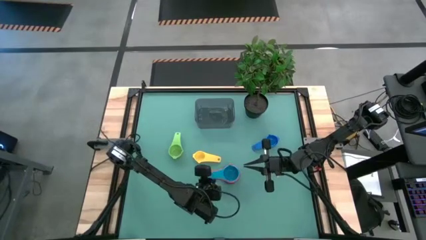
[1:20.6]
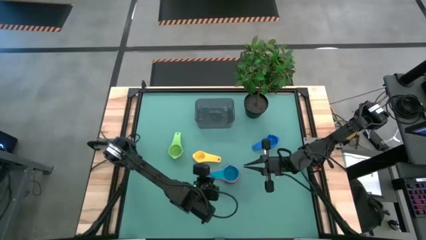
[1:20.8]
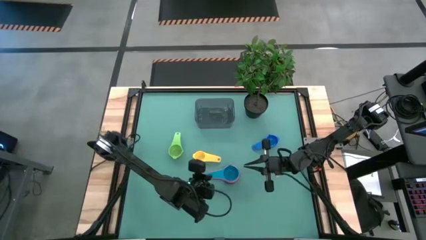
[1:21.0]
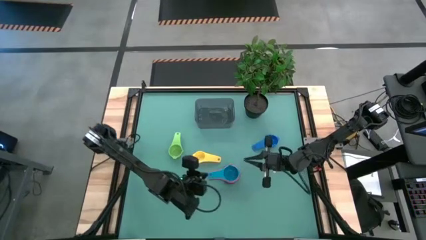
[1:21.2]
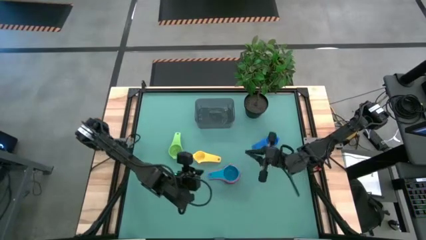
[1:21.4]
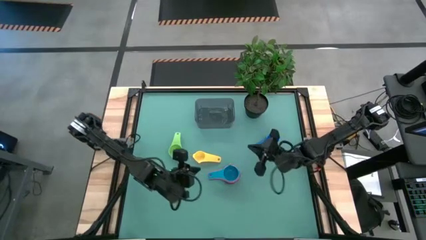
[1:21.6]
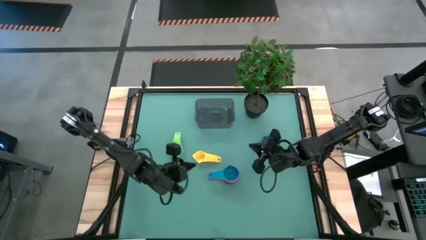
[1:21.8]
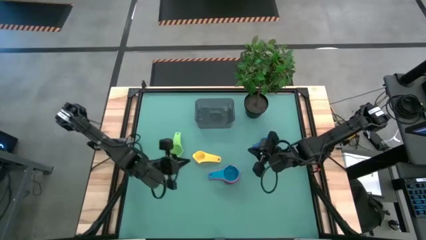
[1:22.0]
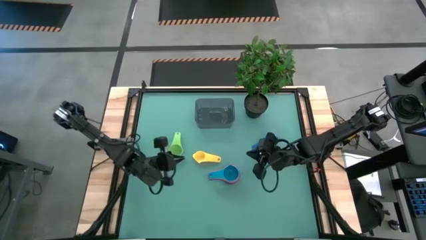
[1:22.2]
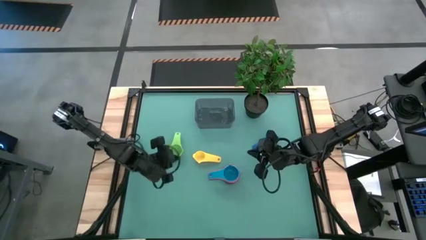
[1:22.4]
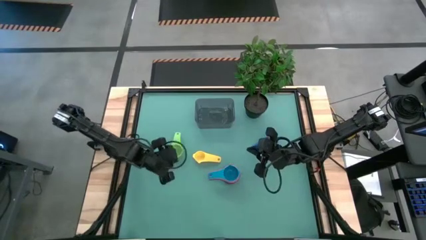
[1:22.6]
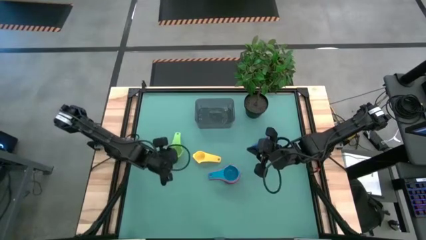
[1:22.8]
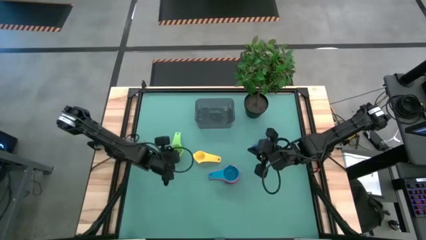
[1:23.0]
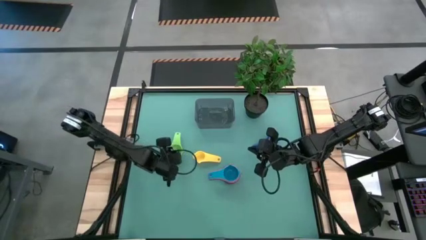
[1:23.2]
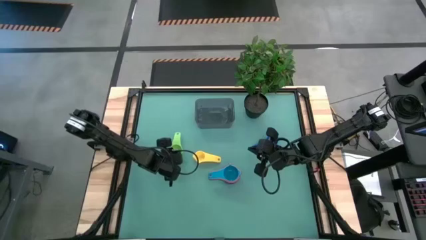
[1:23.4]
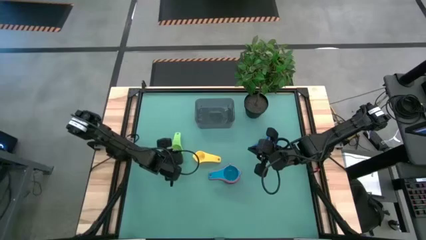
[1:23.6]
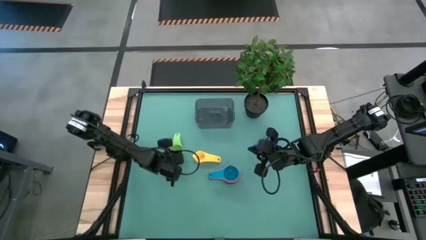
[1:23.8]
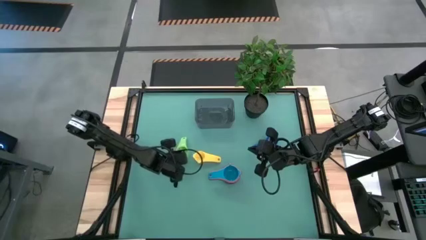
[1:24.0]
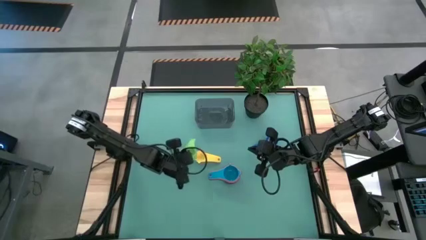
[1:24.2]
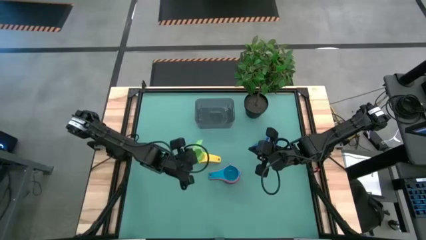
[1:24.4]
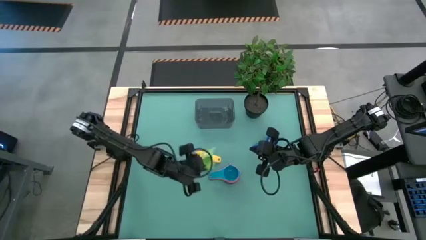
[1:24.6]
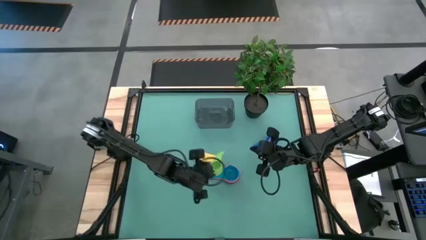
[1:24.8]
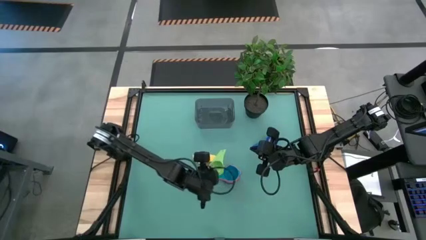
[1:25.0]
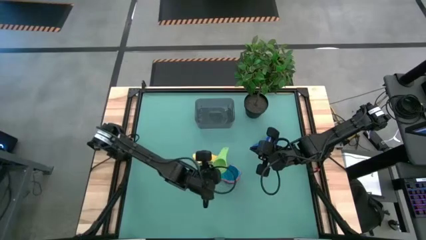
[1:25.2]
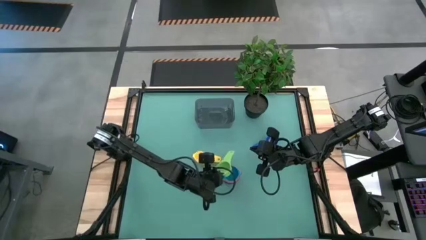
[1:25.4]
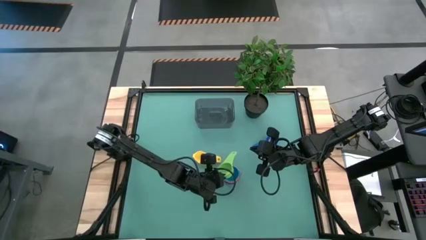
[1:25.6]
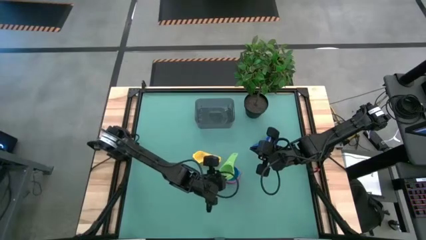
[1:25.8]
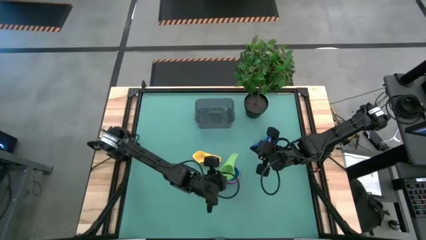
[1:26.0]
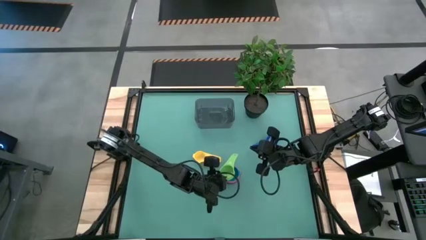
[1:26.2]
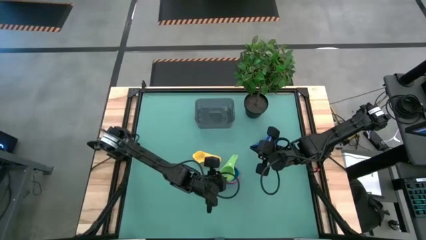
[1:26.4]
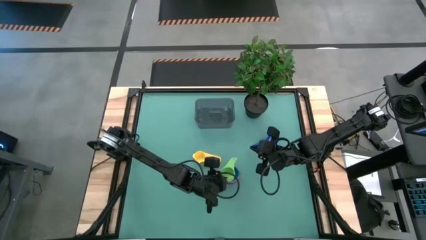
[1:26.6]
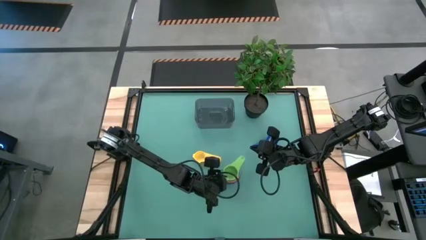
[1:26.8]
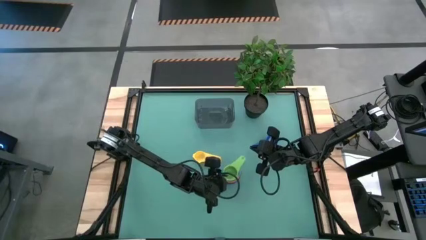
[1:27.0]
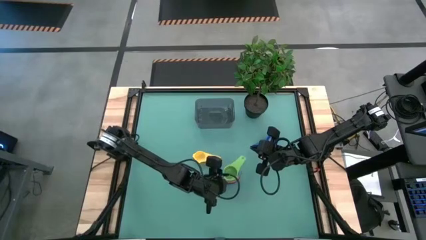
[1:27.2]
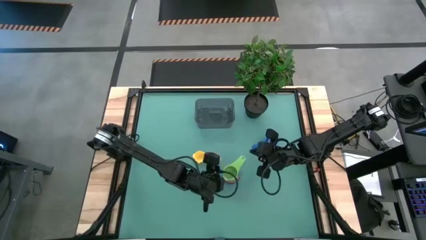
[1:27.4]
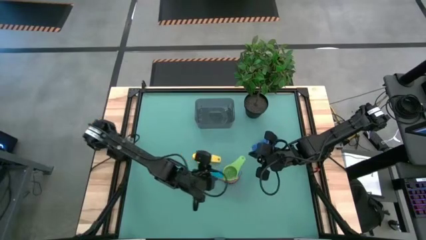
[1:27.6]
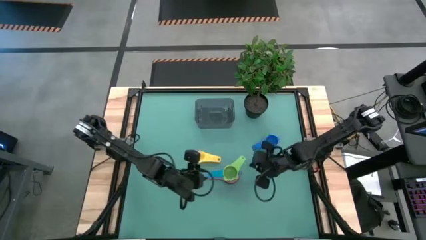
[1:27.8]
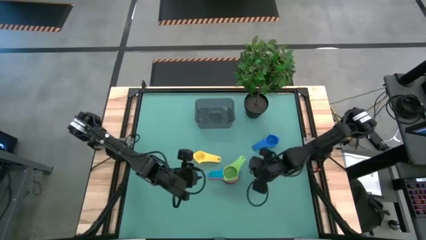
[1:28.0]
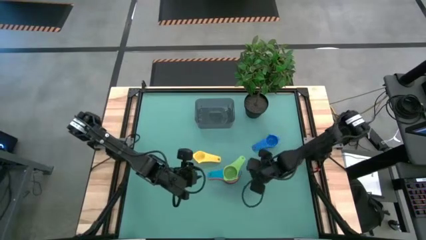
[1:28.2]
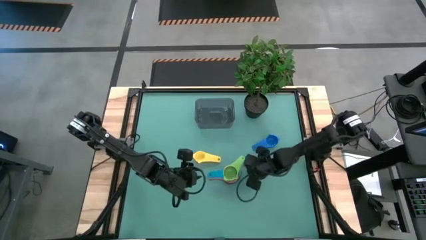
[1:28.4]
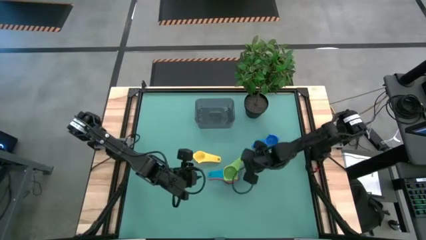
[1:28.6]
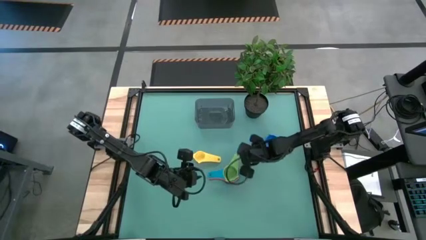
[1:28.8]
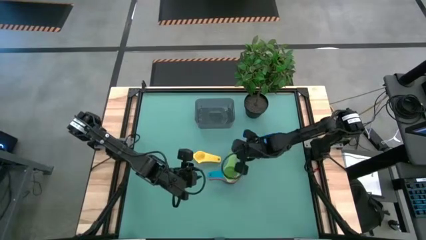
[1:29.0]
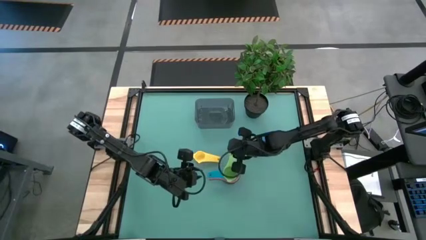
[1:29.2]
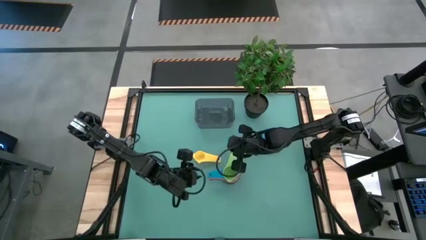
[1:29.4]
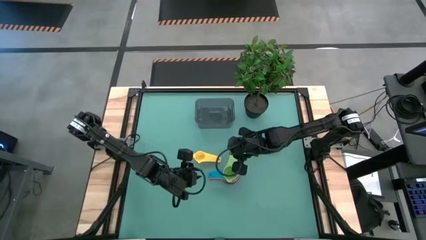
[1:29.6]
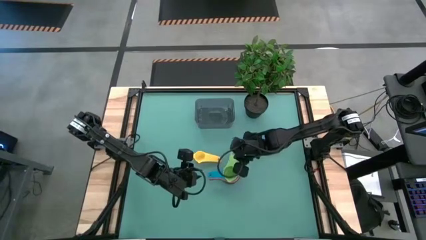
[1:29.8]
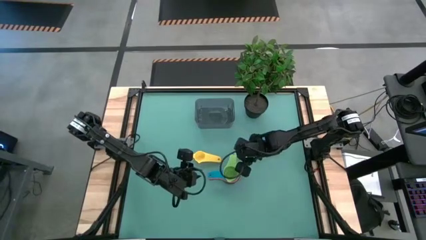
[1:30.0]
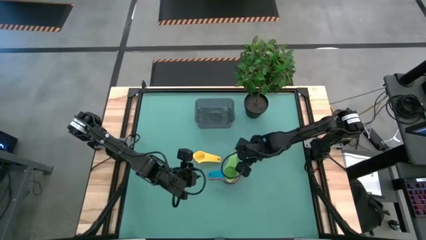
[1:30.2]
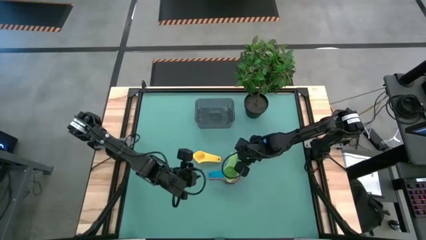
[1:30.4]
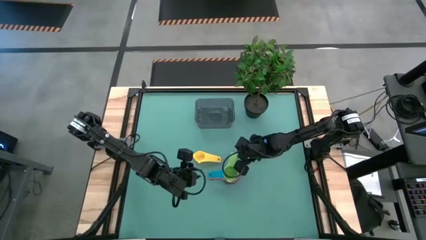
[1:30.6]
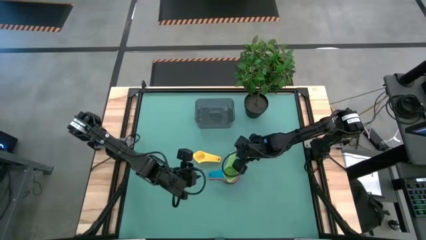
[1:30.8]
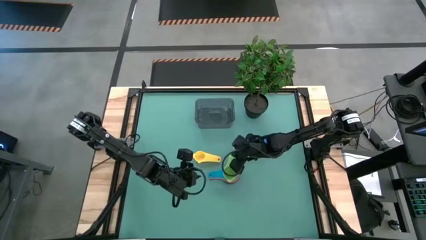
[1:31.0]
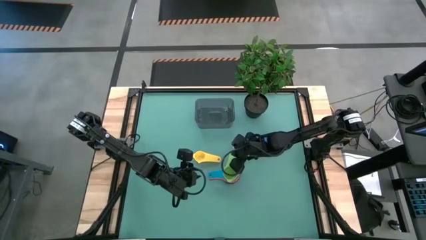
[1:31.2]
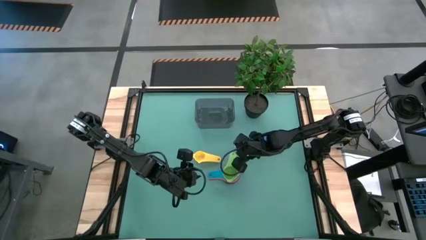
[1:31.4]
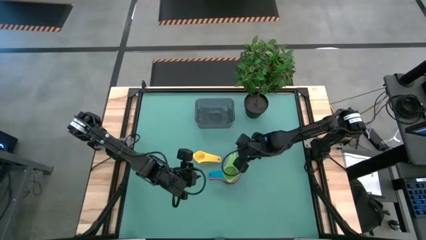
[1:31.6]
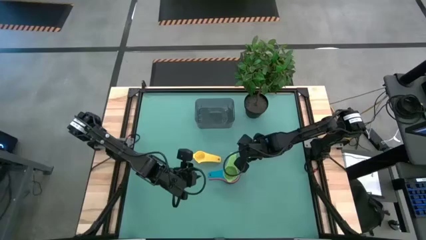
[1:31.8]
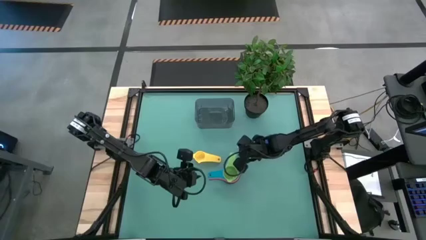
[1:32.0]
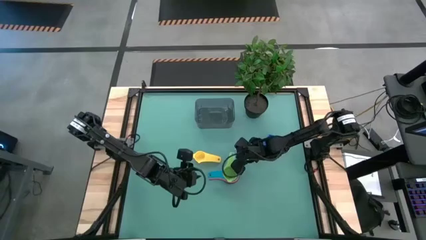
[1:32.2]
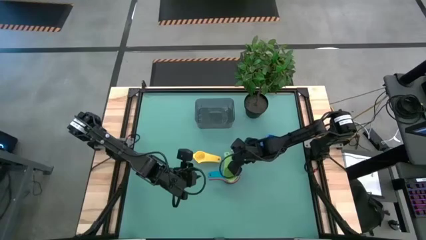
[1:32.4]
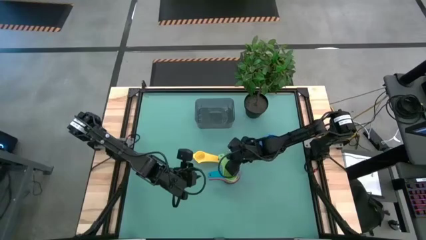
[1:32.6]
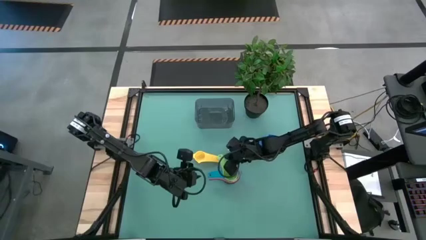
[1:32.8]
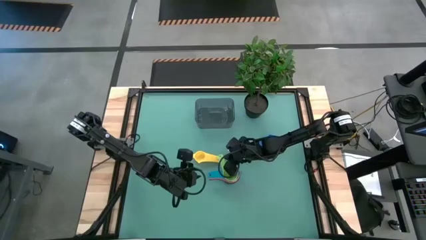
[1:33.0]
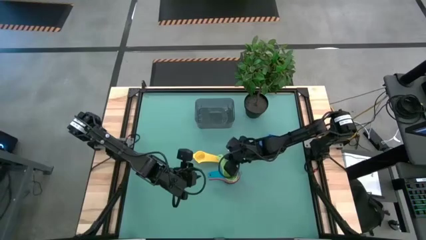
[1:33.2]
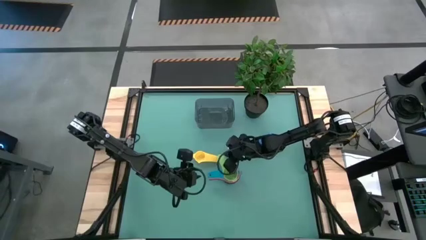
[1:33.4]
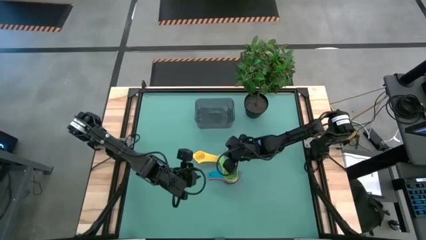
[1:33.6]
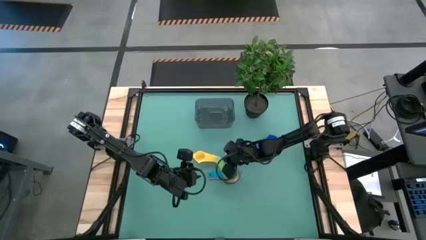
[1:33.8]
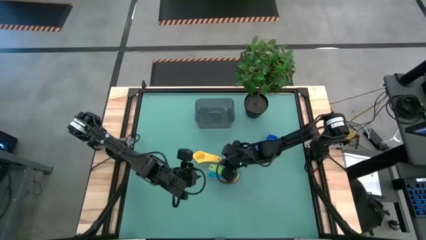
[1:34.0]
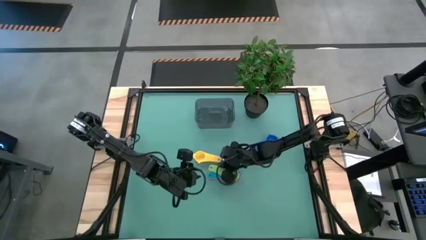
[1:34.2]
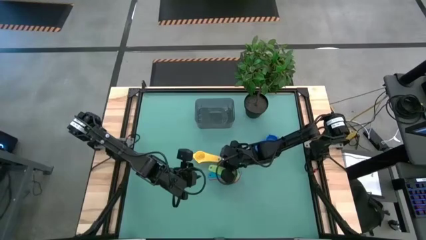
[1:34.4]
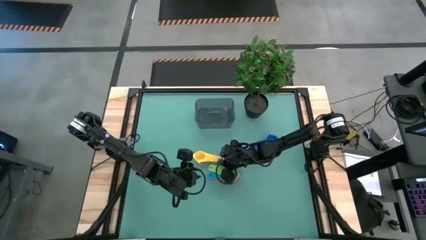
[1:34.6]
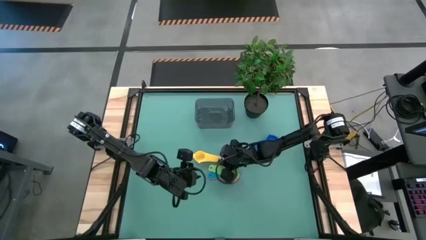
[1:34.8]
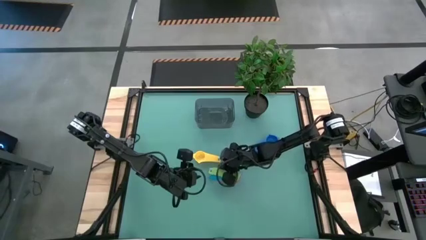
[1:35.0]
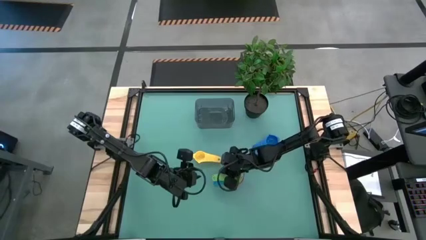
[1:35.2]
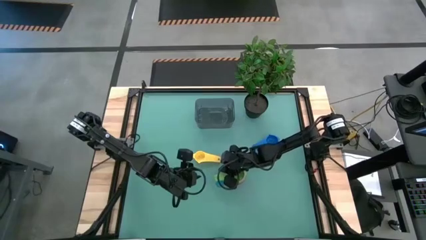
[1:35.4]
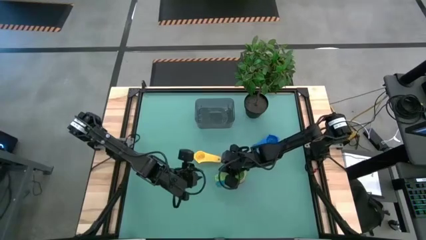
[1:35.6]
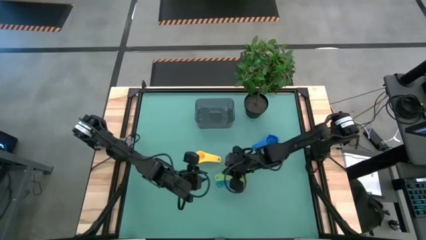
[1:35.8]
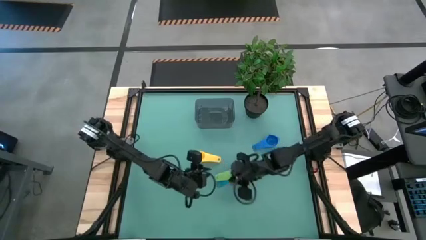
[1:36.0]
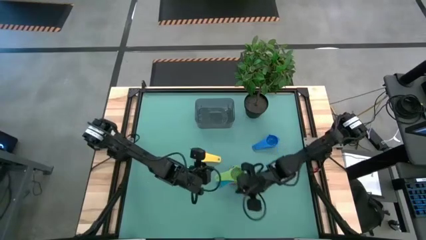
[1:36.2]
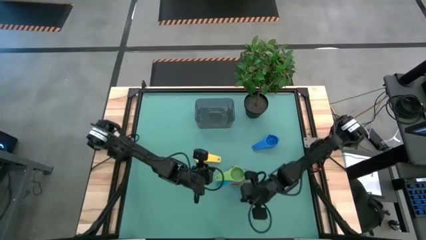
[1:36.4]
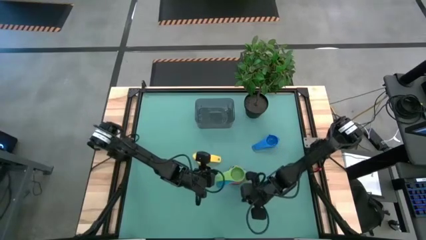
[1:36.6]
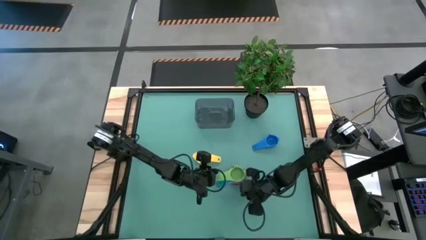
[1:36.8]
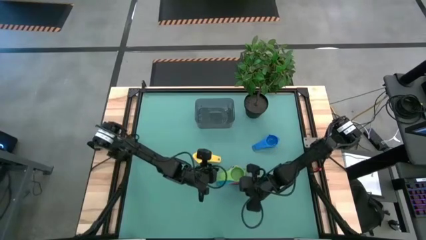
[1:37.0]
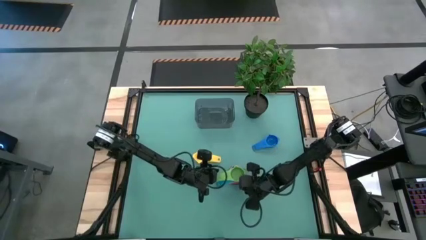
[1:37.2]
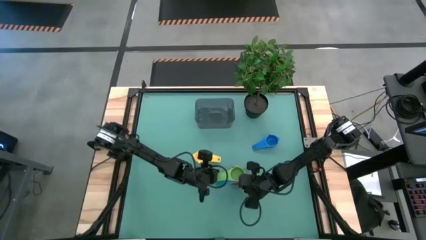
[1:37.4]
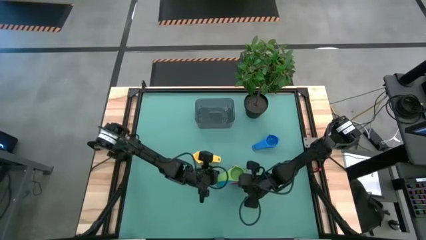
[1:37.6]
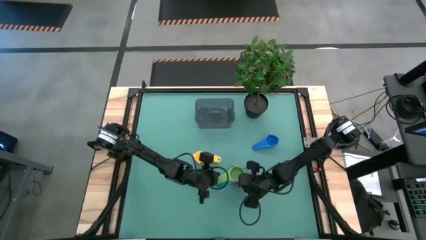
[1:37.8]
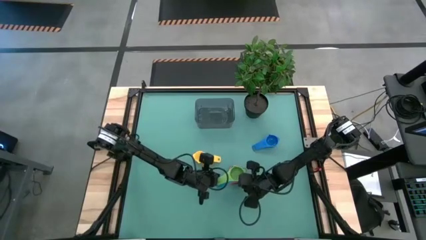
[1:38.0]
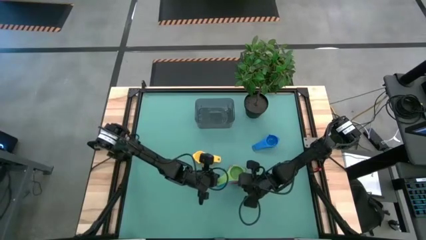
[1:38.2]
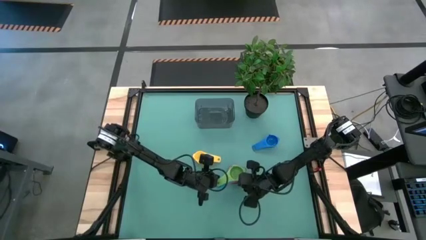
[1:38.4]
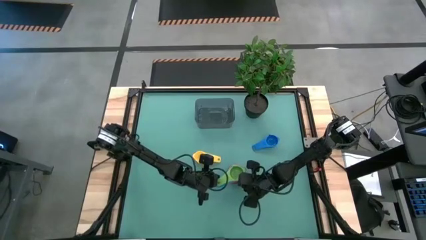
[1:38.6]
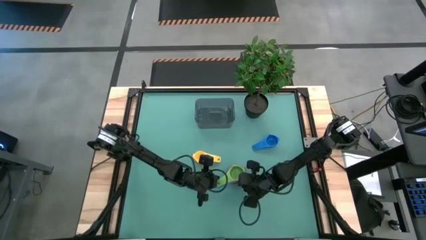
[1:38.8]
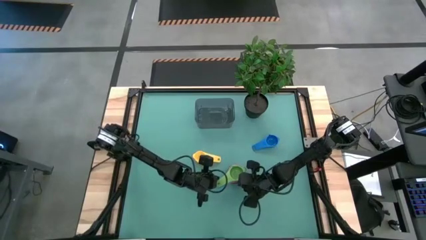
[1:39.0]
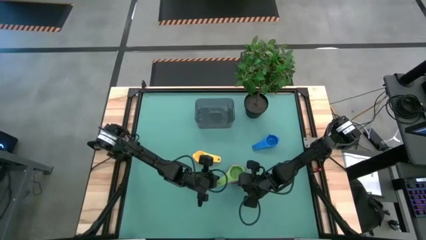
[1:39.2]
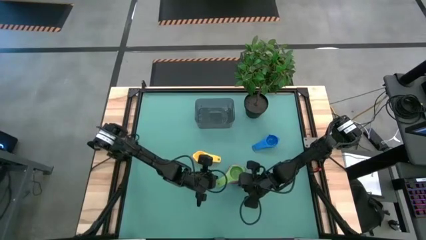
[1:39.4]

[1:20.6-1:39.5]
Task: Nest measuring cups in basket
Stack the green measuring cup into the light blue measuring cup
